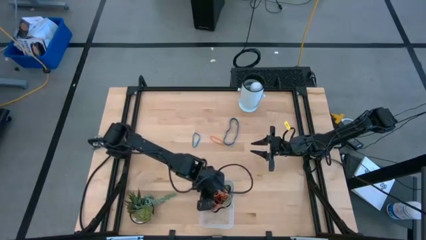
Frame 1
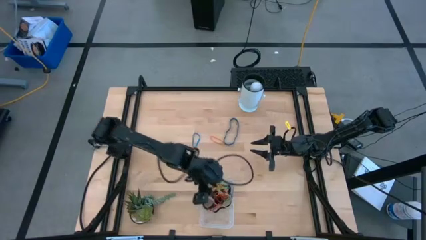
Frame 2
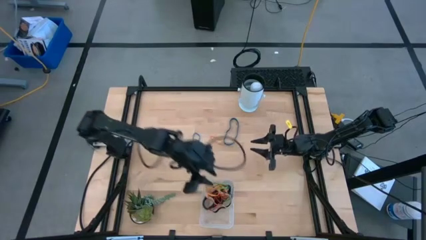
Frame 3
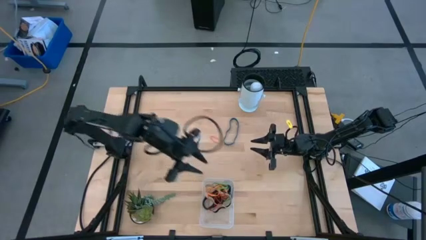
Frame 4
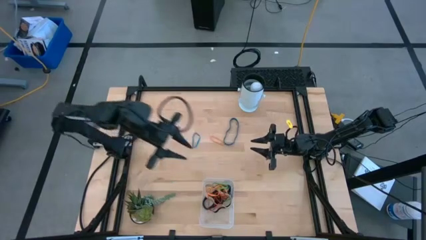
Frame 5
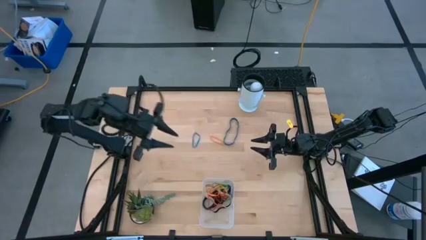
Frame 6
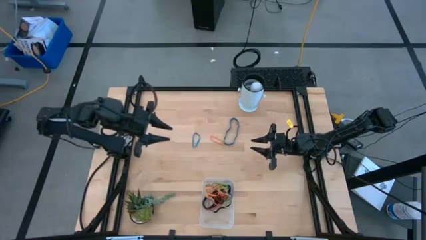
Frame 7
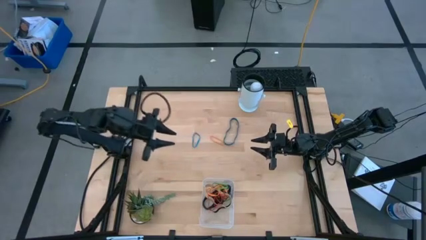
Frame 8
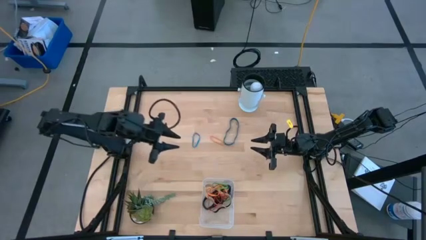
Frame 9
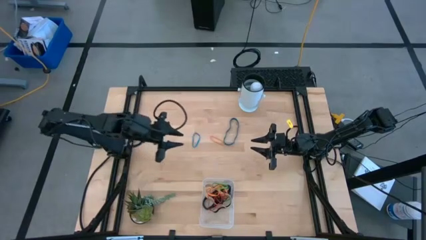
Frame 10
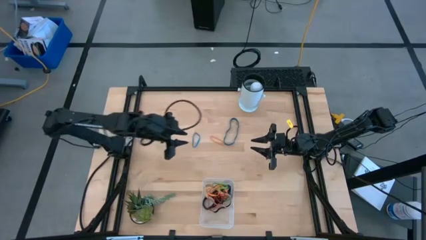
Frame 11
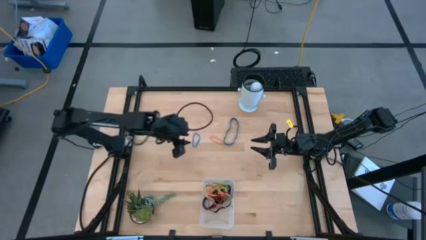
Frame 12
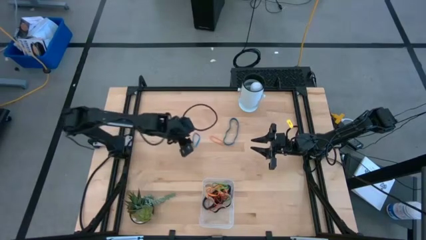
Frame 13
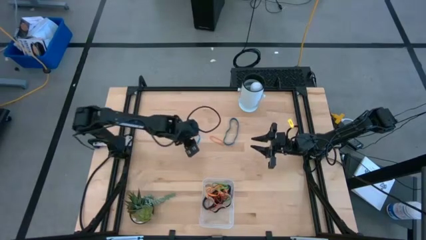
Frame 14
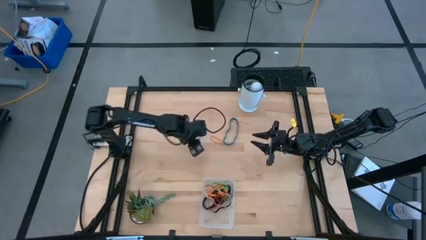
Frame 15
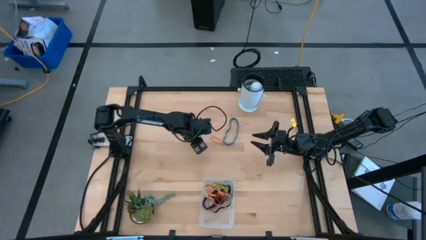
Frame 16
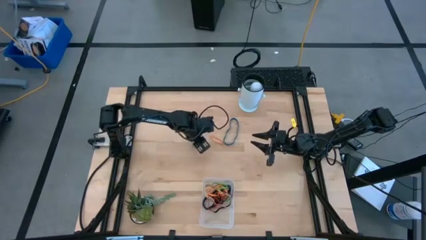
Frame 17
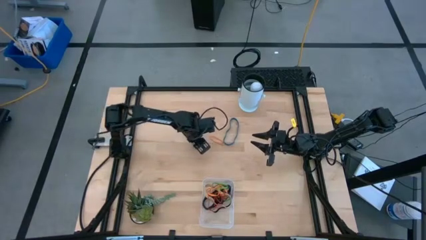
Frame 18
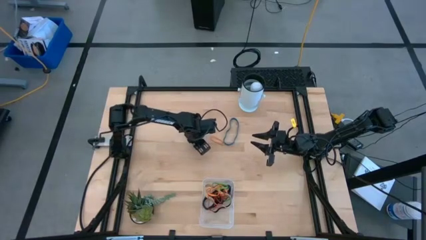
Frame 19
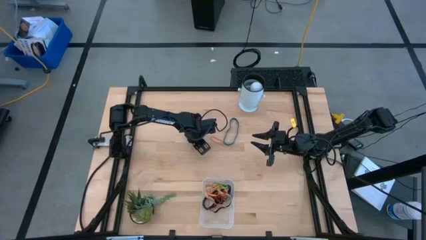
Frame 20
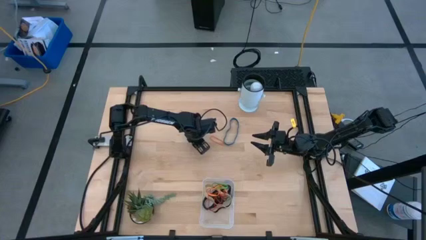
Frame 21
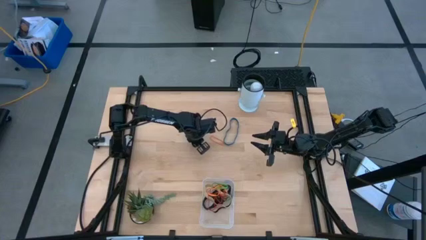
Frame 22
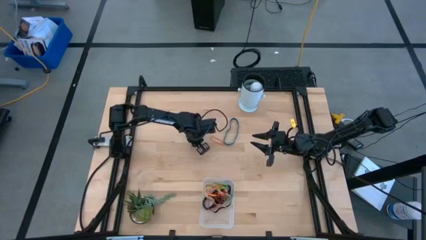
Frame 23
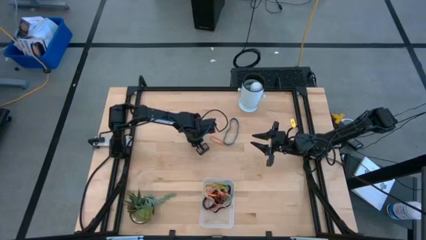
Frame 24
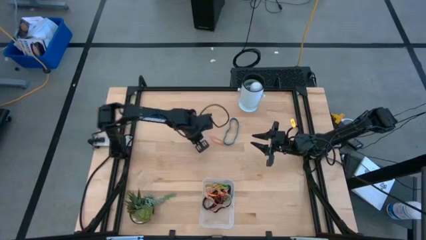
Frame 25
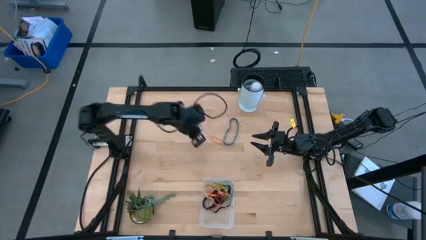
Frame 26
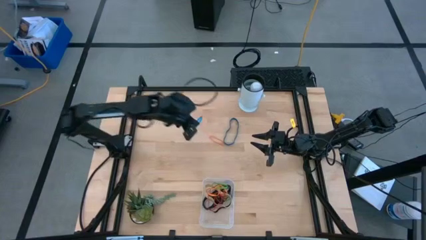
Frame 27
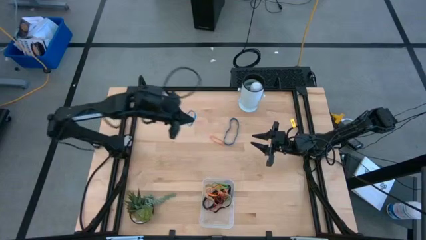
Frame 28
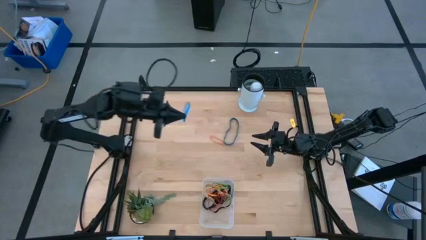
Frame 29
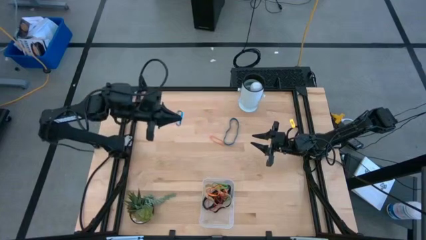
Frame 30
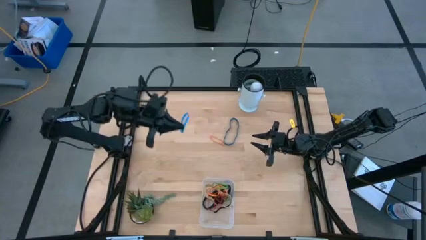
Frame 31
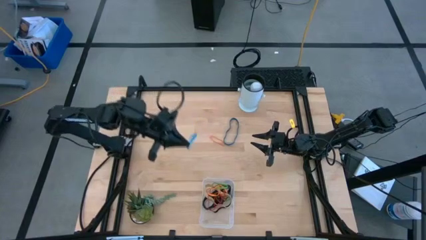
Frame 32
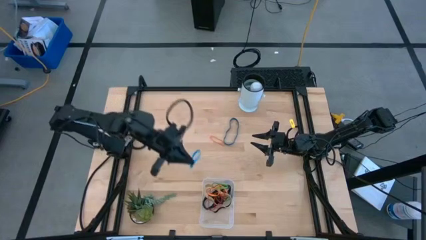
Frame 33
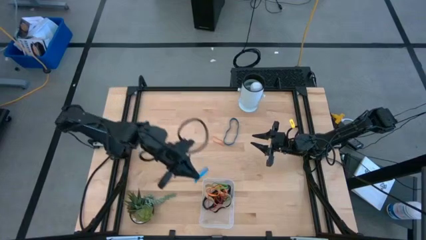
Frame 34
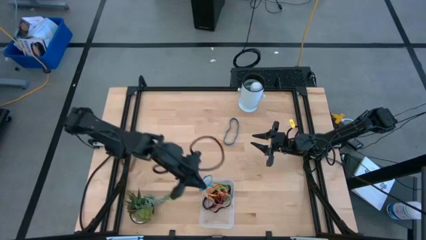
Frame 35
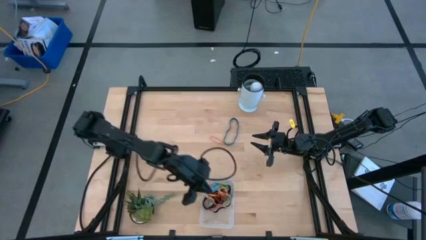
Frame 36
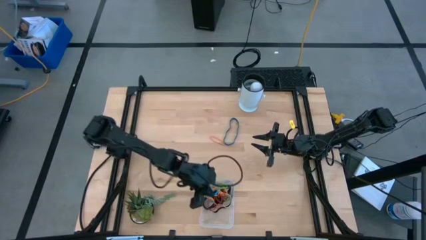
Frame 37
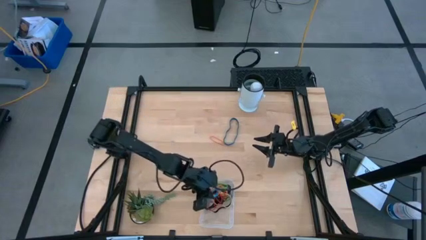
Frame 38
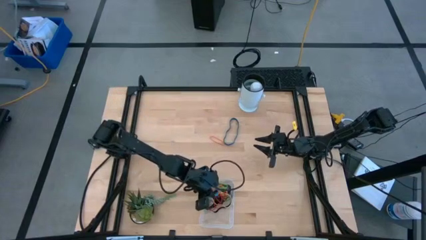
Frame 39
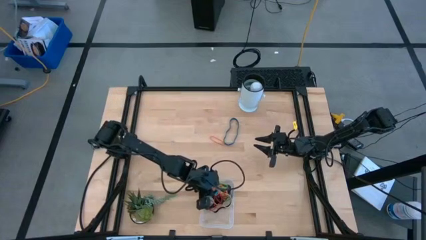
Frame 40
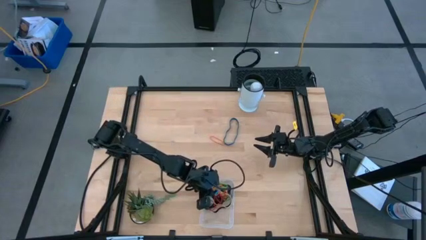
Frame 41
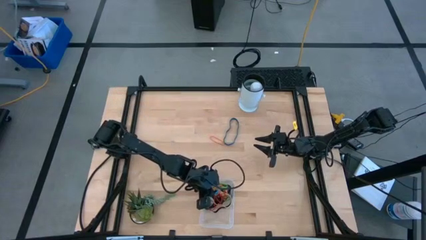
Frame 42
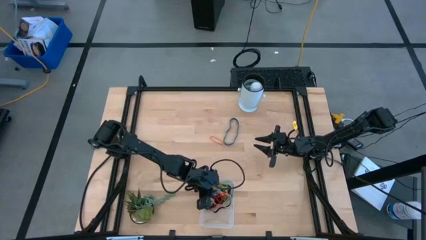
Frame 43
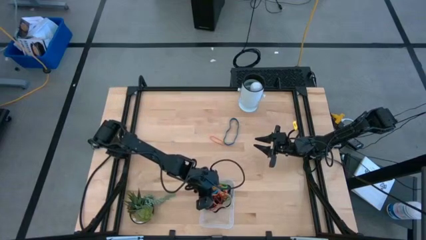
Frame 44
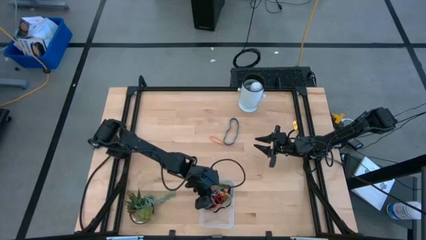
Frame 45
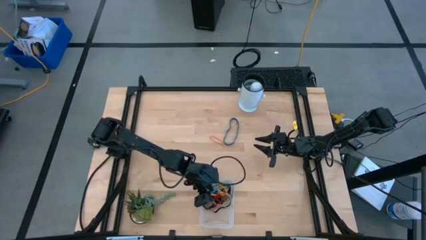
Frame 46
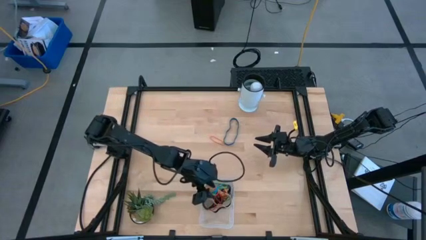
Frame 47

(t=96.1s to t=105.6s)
Task: Pick and place rubber bands into bin
Put the blue rubber band into the transparent bin

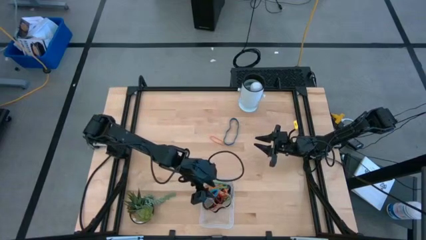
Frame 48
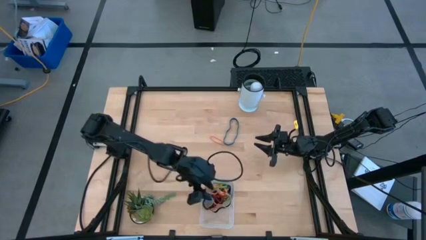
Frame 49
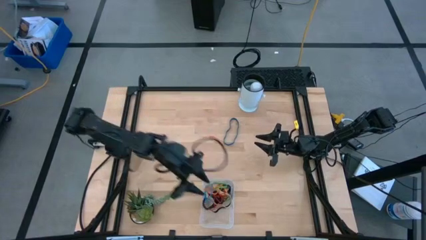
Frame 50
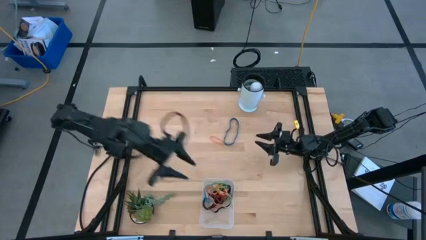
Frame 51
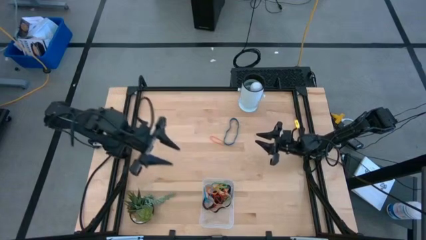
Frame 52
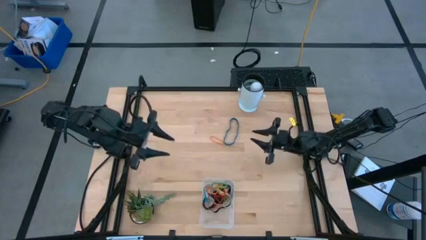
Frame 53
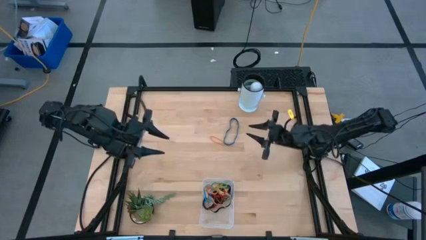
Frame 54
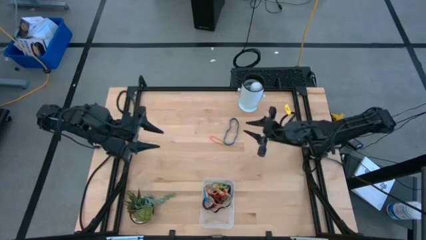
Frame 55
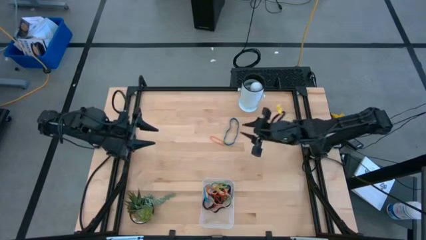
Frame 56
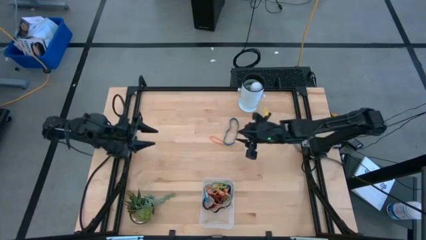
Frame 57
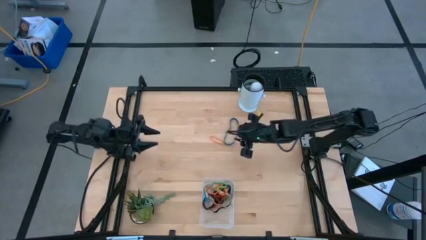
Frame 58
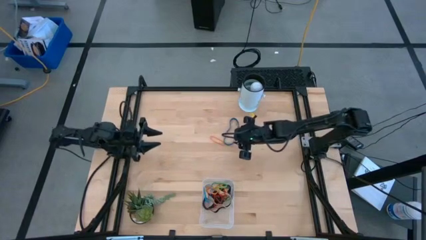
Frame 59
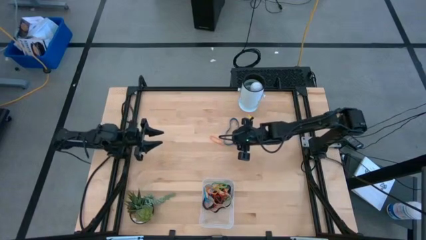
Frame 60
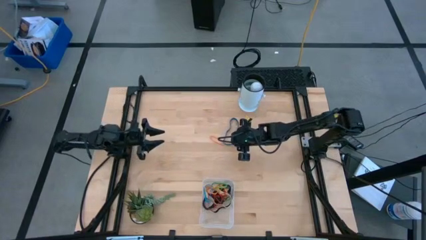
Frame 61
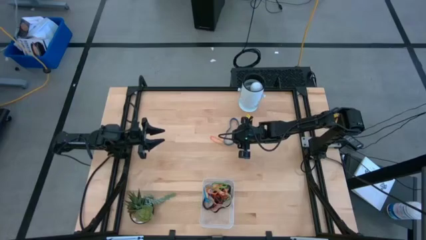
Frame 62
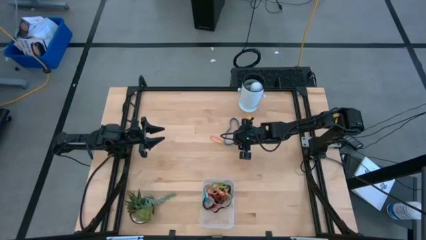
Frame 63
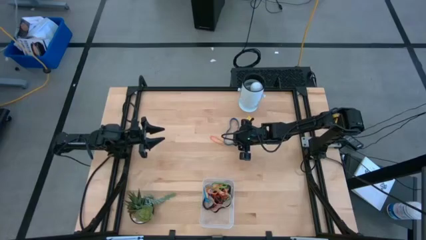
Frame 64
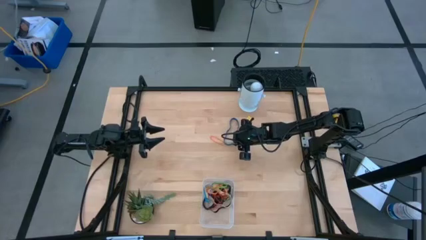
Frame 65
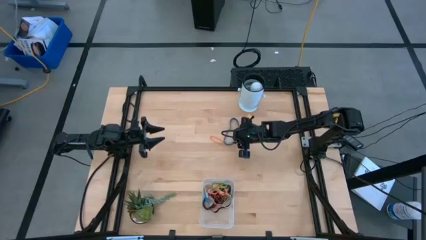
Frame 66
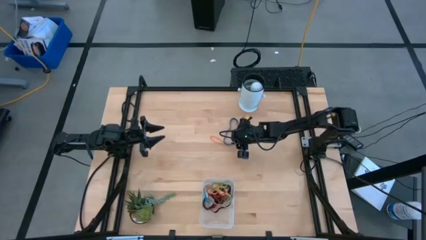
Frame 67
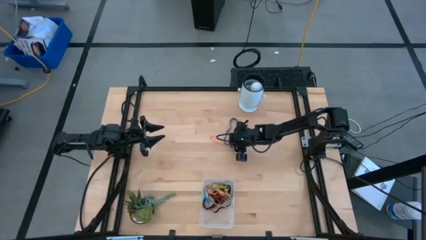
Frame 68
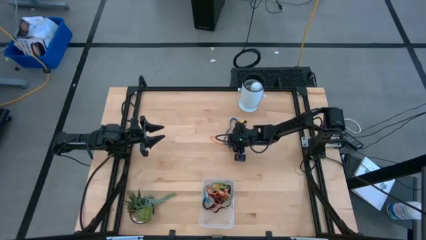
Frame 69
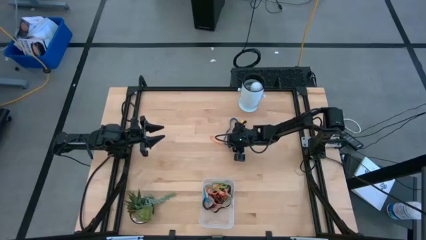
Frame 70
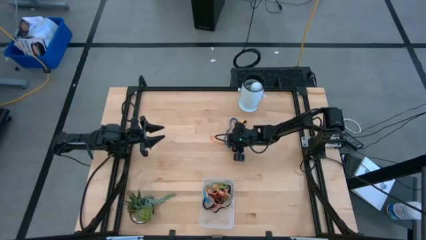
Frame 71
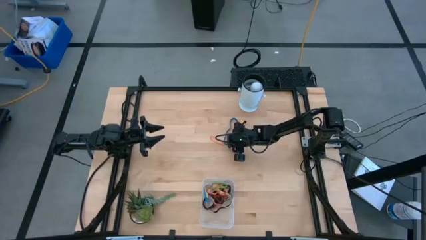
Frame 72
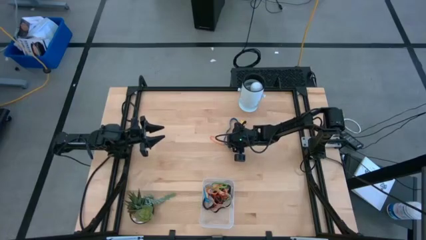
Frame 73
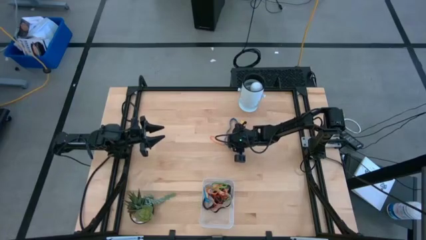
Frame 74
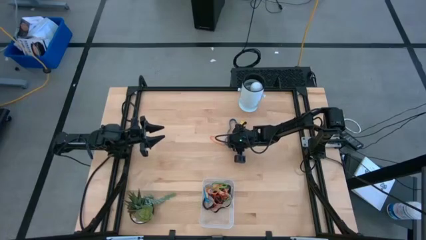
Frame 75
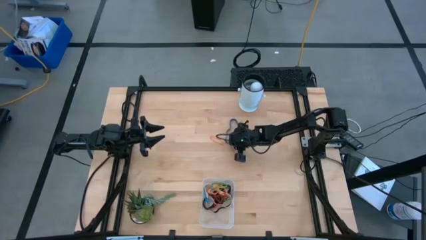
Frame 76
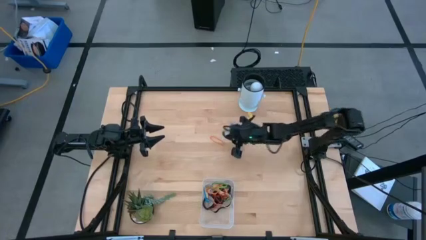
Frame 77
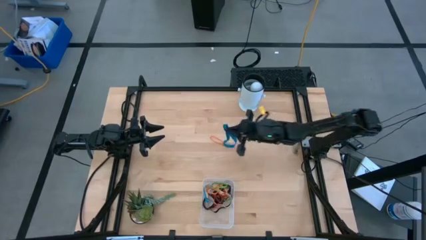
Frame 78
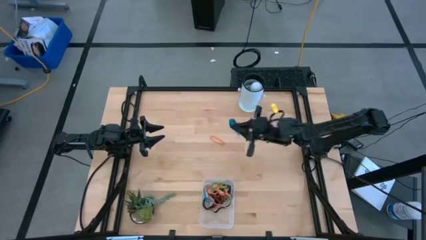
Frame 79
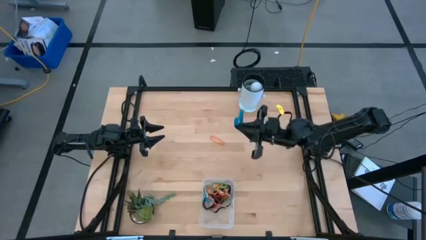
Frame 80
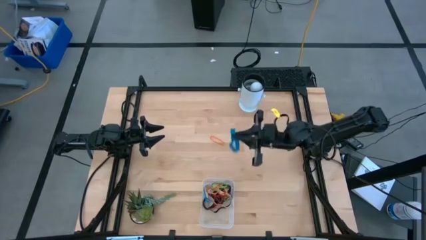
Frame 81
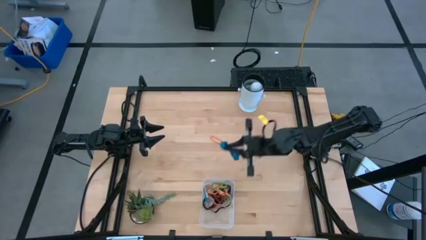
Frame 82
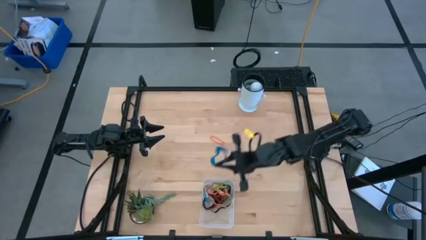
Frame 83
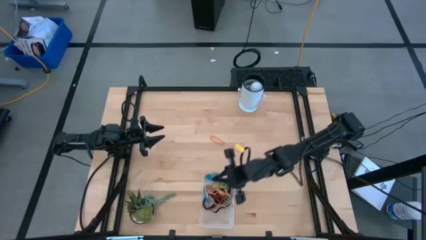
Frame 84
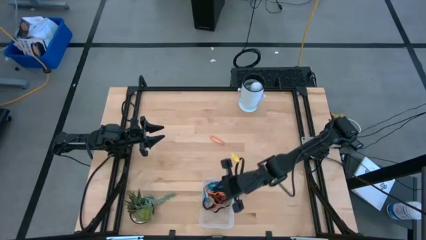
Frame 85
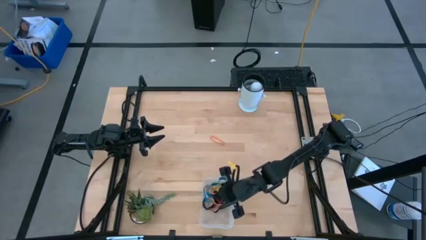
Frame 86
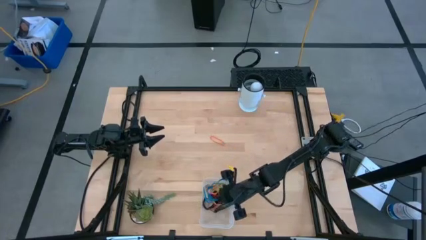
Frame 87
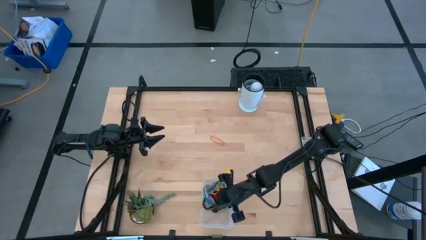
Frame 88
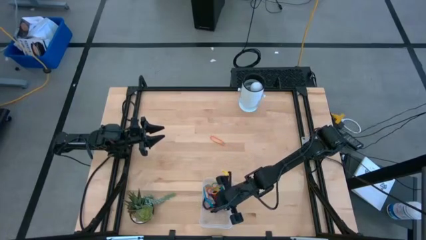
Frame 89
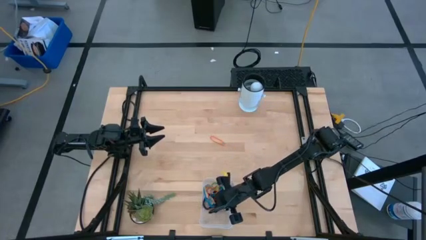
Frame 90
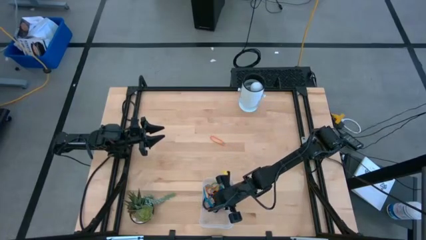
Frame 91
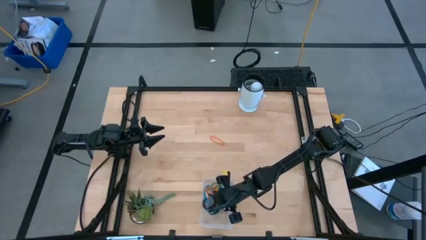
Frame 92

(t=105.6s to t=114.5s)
Put the blue rubber band into the transparent bin
